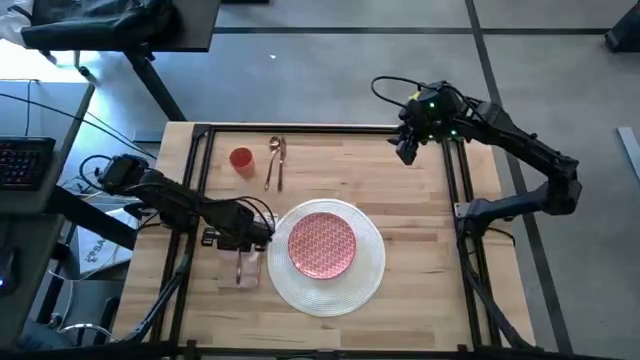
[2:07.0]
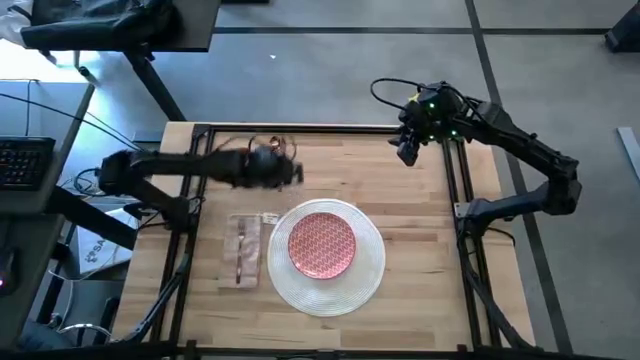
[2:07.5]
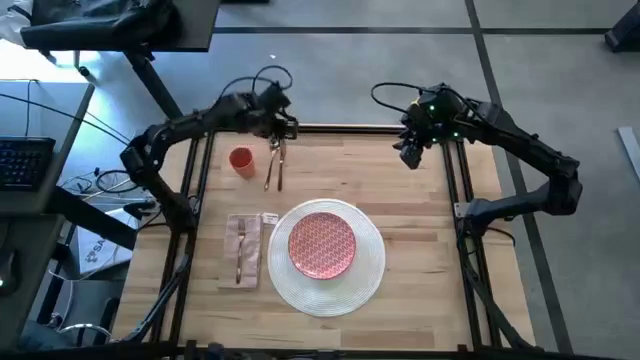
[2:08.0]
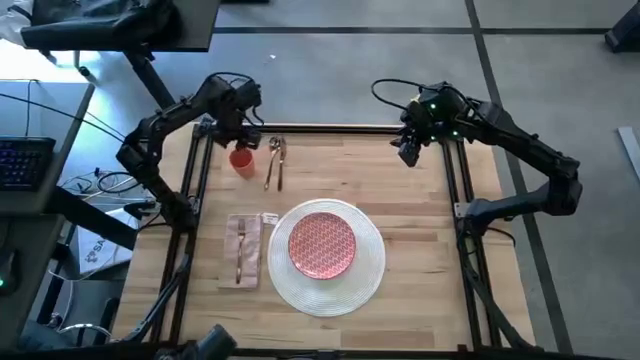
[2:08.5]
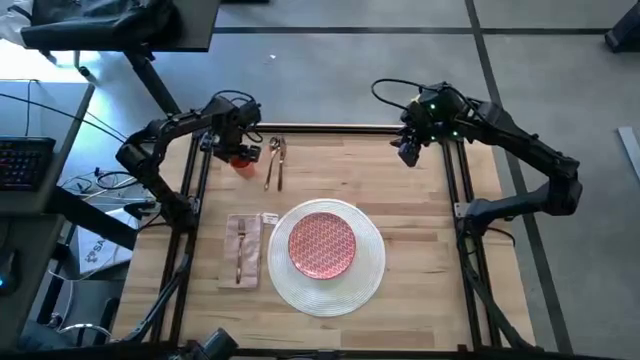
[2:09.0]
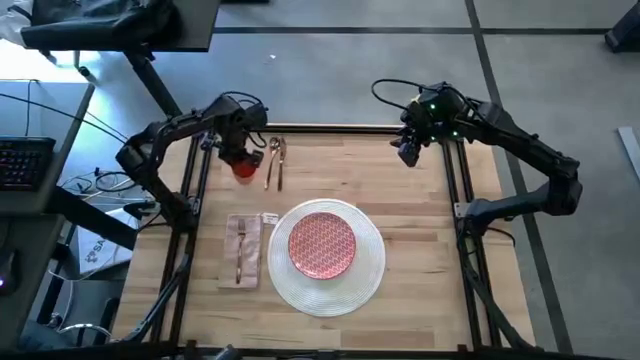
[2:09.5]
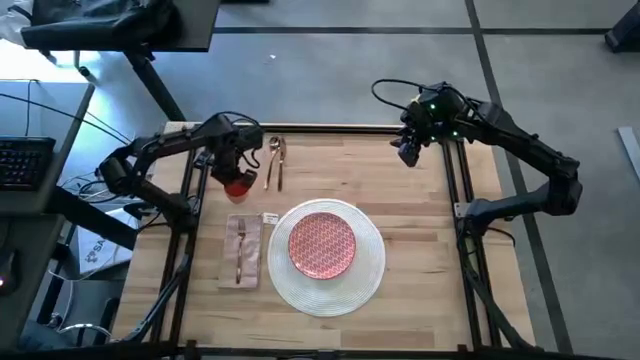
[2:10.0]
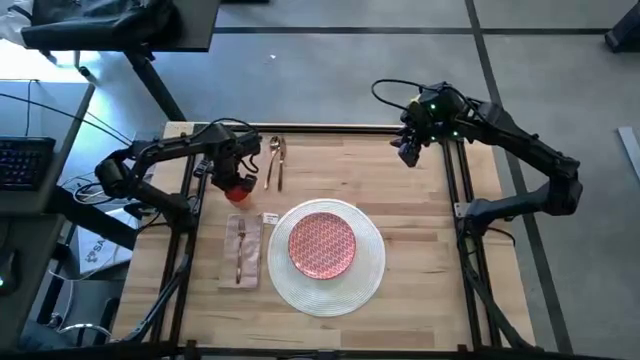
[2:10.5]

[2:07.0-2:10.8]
Task: Set table place
Adjust the orange cup

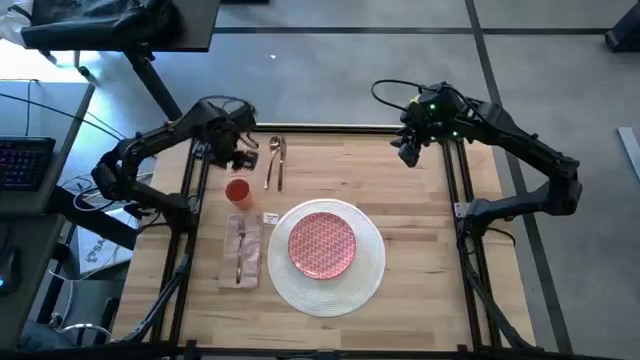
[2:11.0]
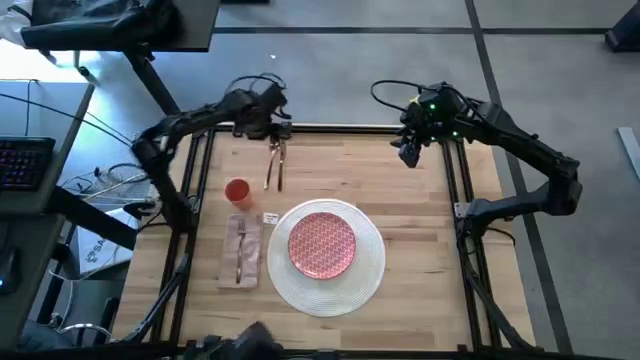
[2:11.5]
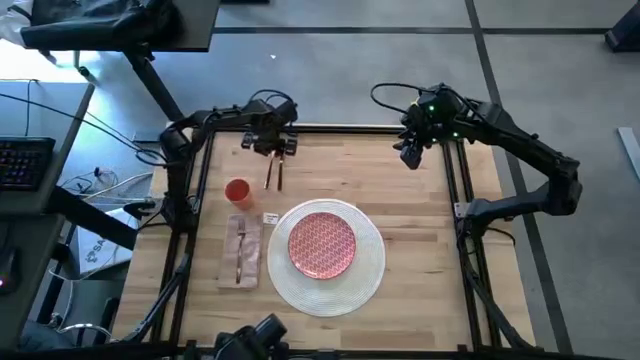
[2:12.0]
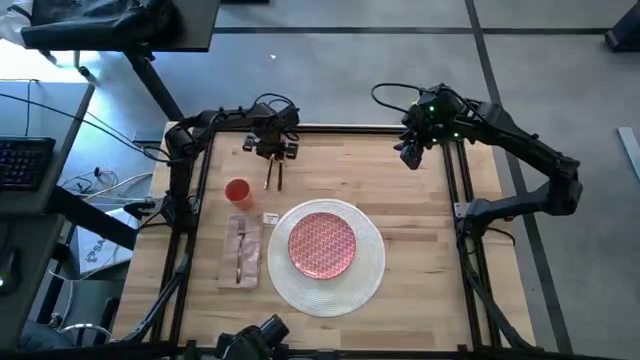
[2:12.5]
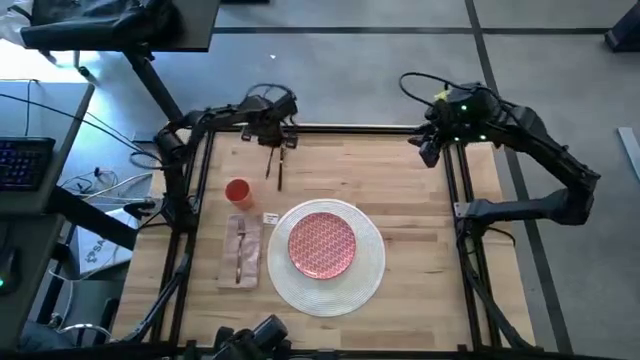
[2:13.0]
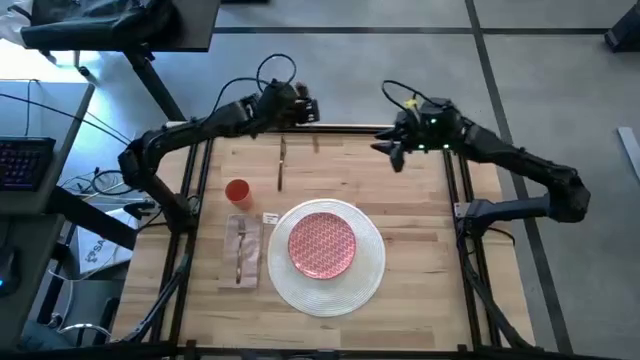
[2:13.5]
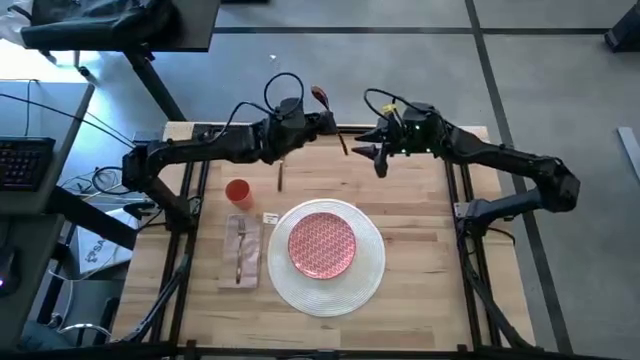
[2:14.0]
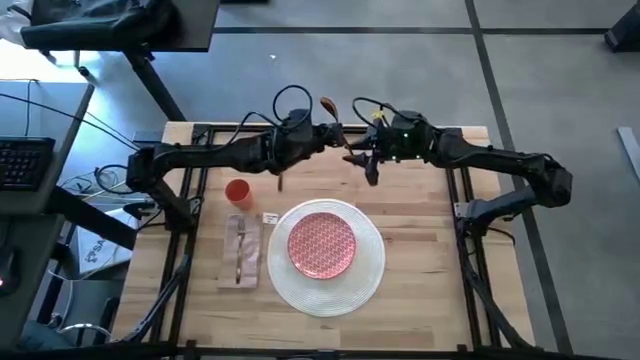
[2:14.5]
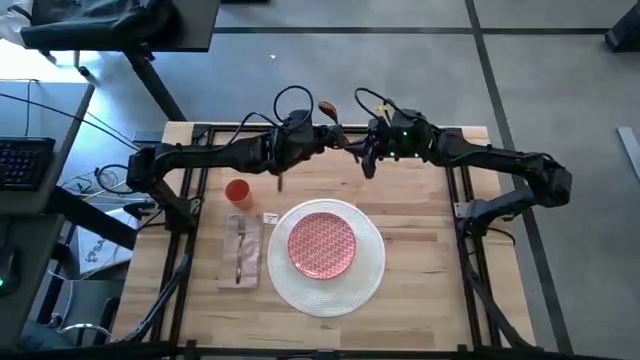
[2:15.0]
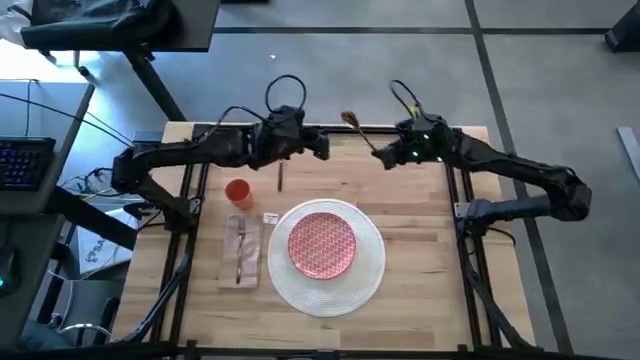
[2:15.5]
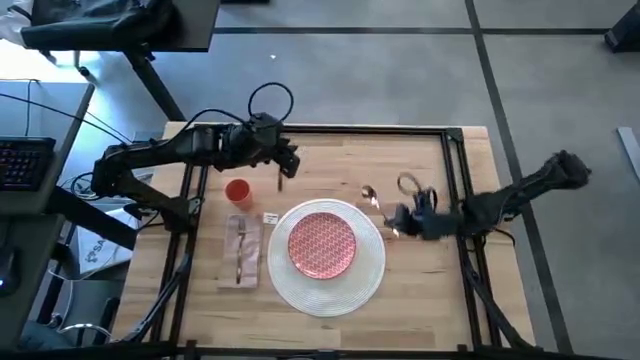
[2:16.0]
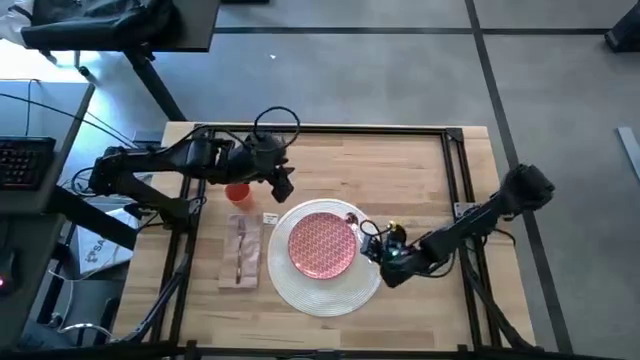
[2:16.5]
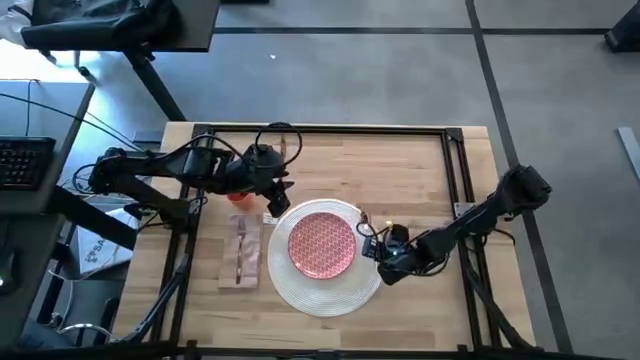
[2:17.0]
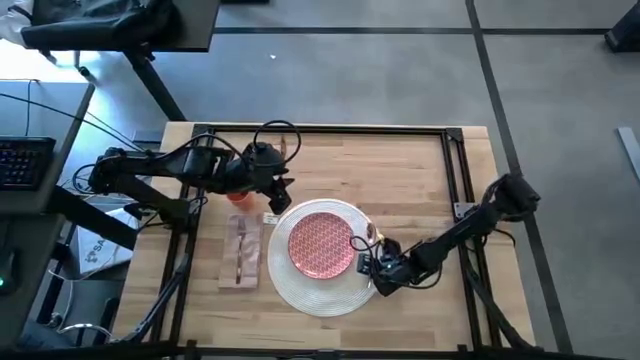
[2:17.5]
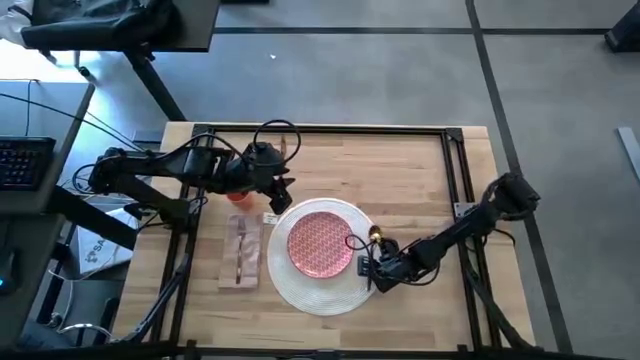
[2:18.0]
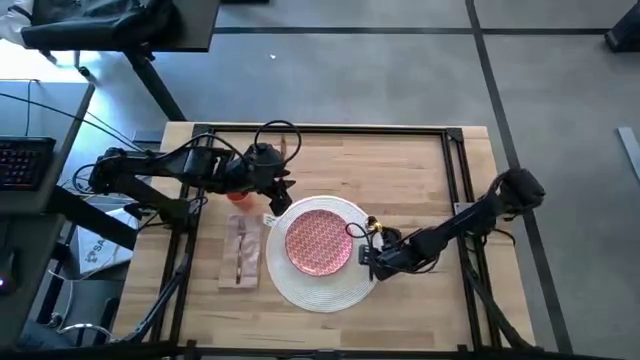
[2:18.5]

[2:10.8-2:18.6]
Put the gold fork on the white table mat to the right of the red patterned plate

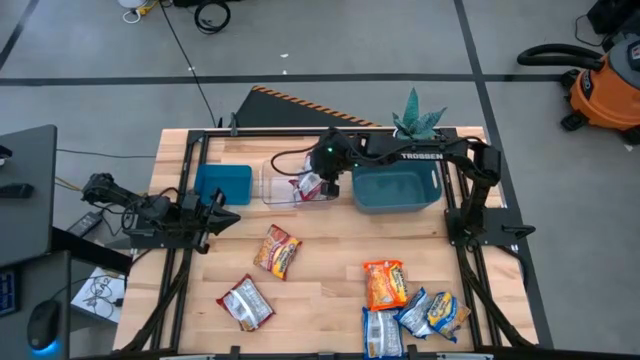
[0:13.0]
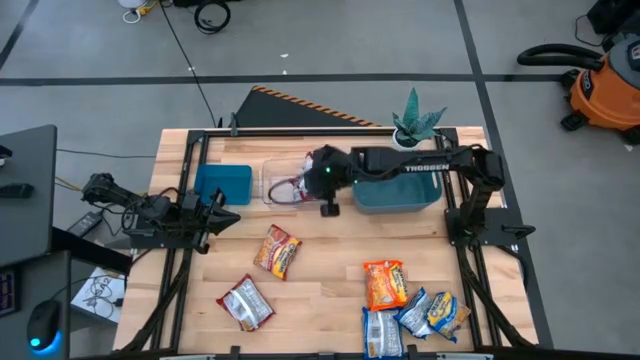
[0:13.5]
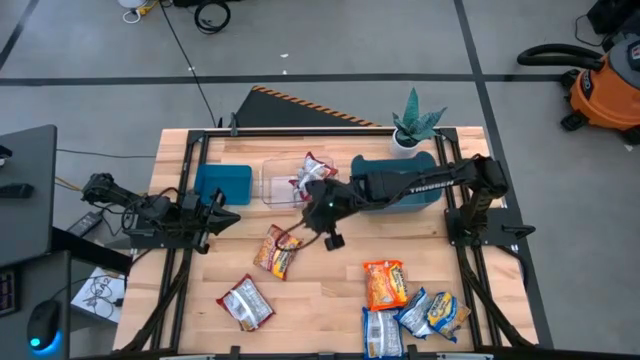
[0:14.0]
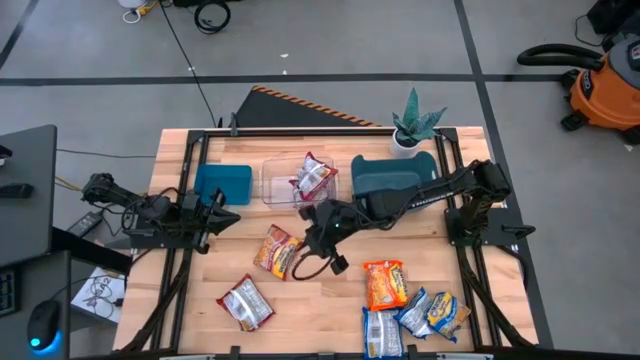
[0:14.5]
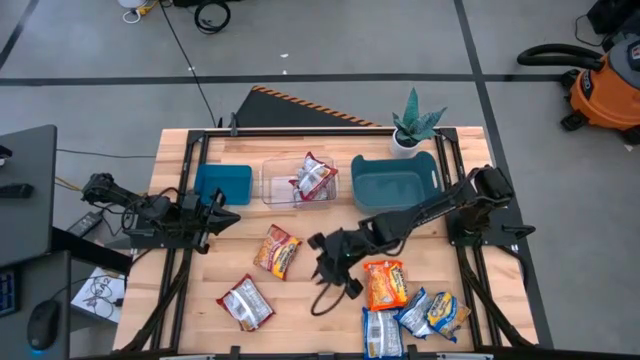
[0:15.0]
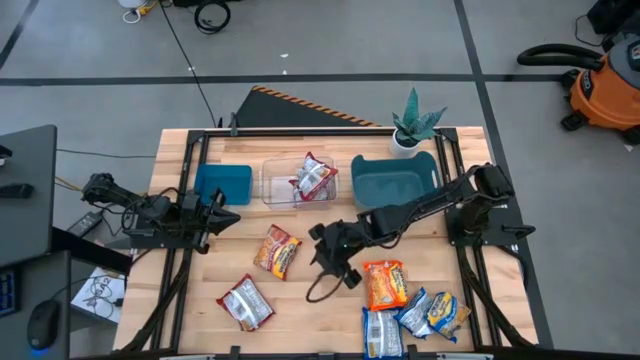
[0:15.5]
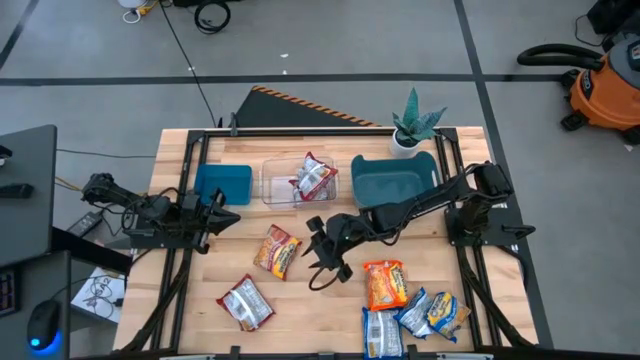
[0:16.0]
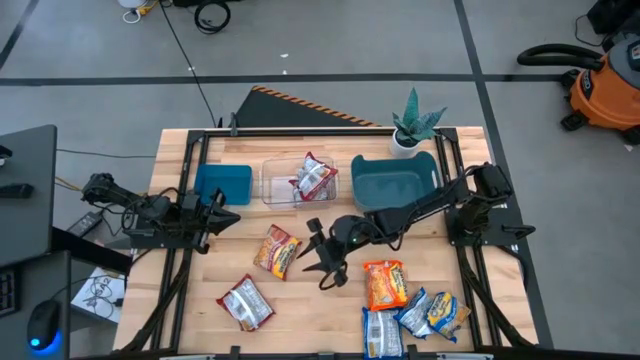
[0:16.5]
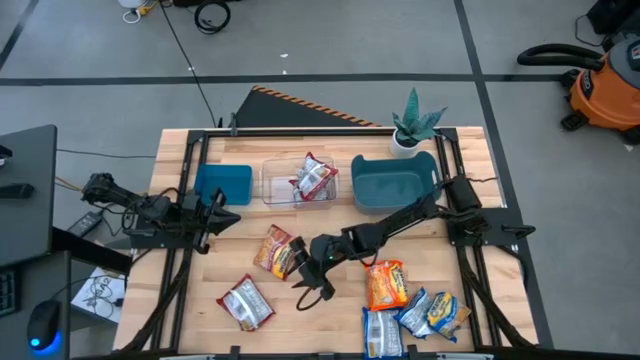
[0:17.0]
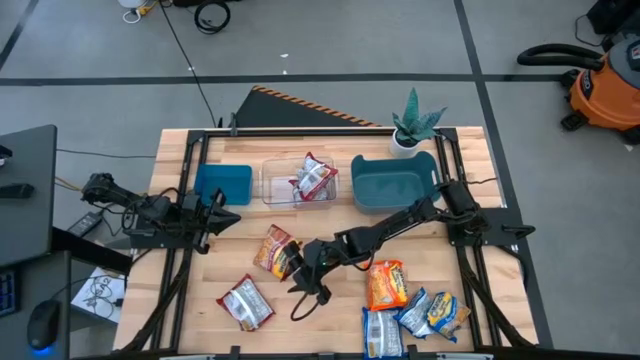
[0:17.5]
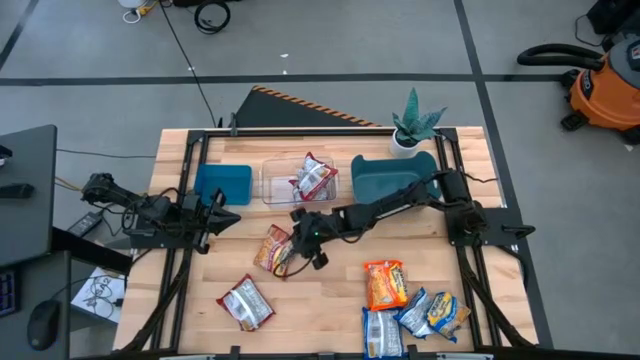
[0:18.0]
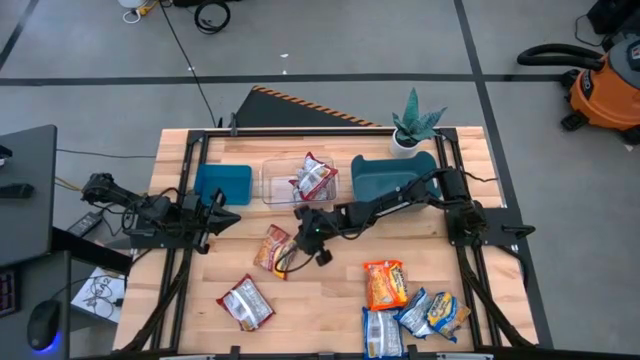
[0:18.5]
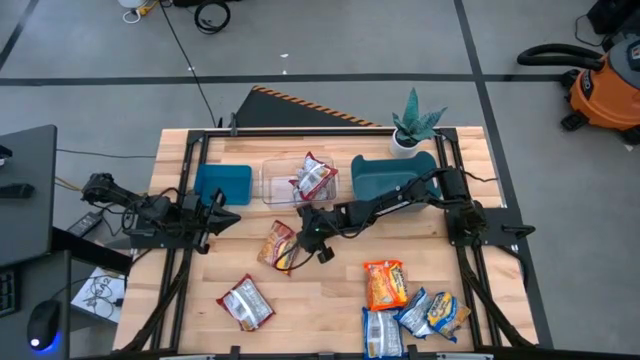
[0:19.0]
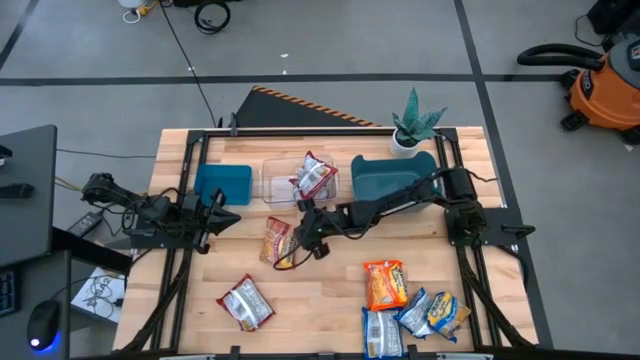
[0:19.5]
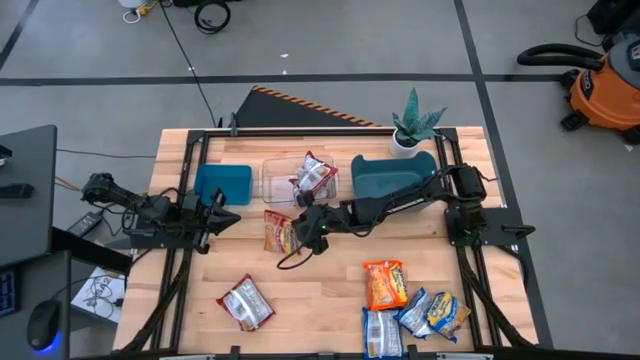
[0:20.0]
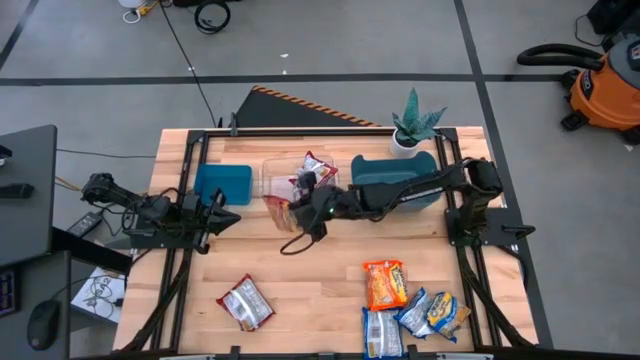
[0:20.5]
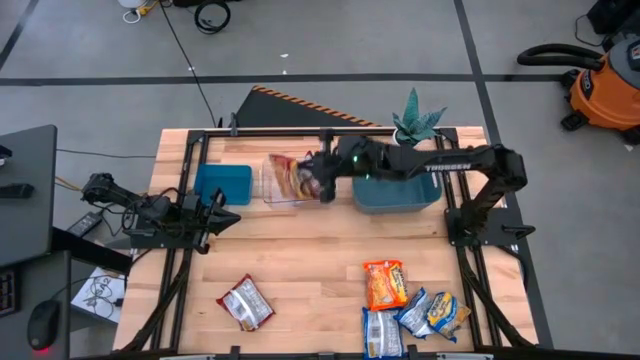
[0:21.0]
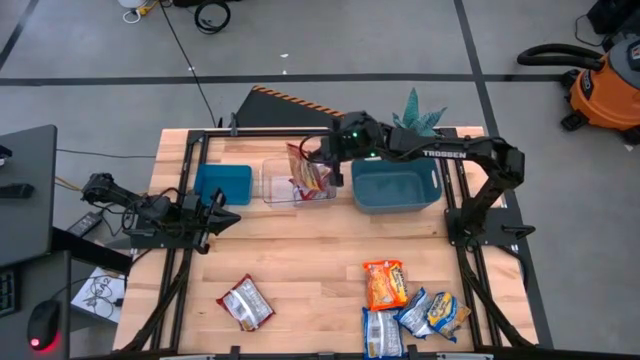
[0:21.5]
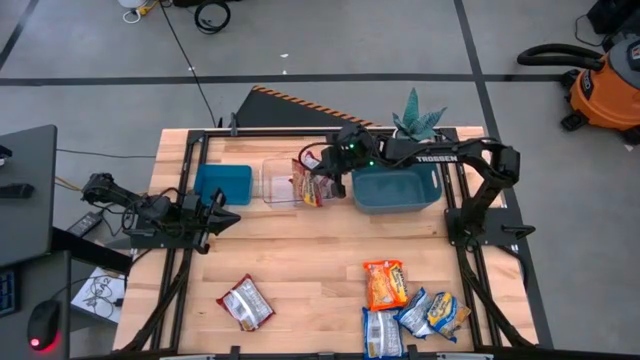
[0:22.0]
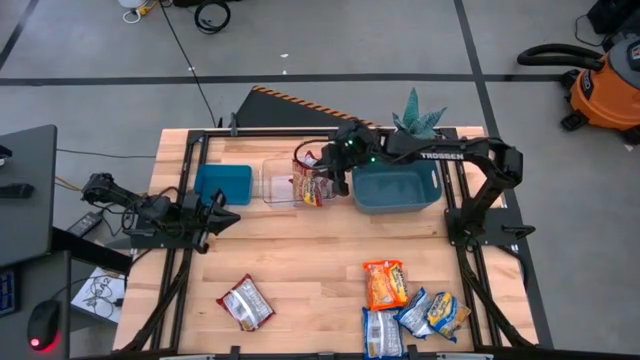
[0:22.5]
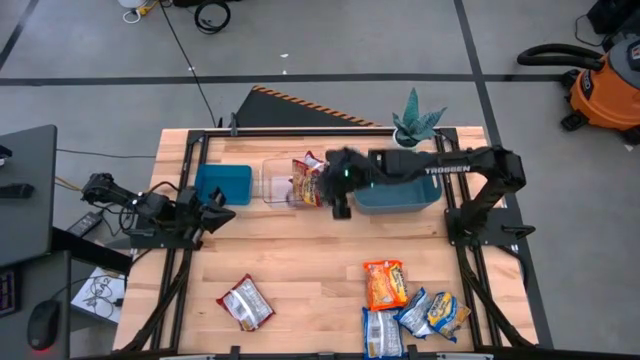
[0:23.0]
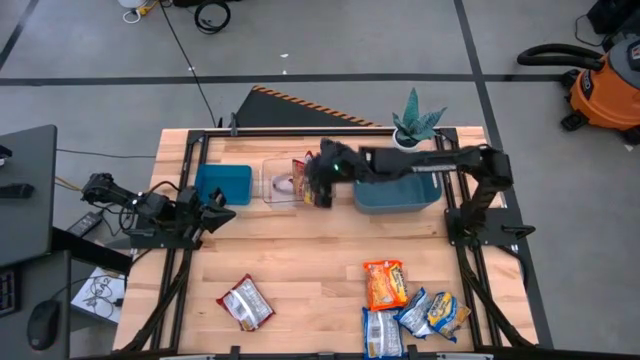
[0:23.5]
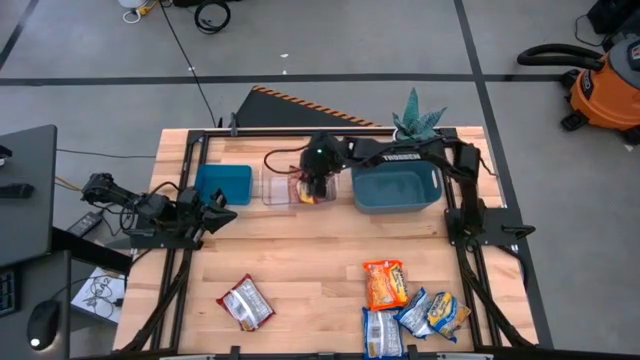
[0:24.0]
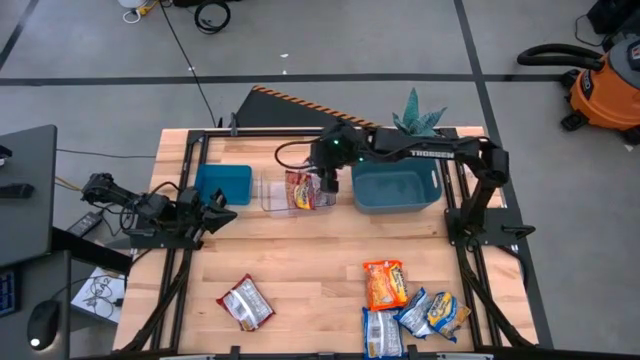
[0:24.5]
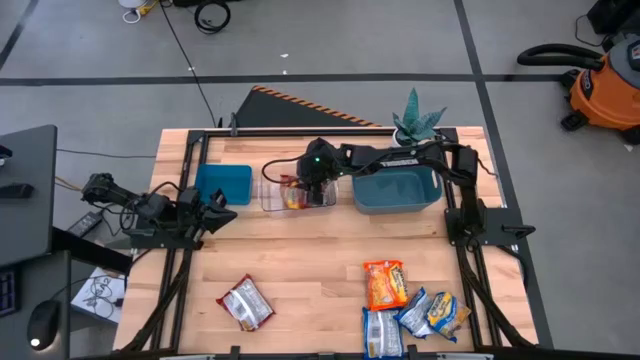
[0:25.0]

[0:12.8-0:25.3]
Task: Sort Maruchan noodles
Put the red noodle pack into the transparent bin
